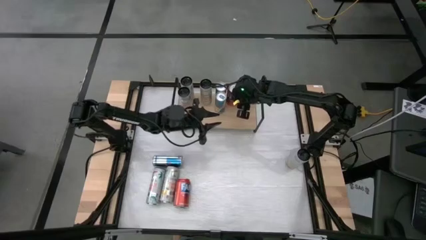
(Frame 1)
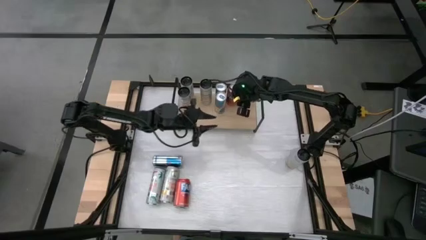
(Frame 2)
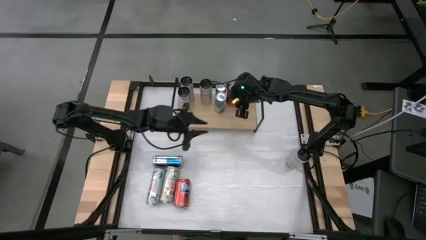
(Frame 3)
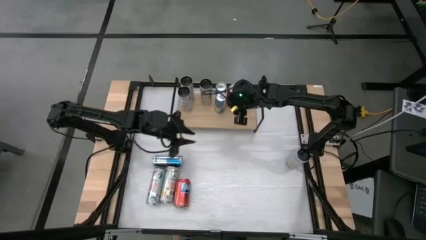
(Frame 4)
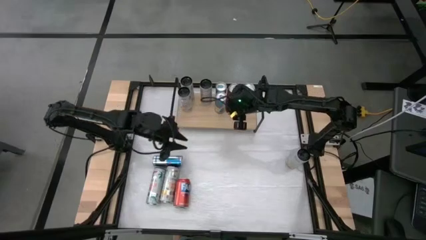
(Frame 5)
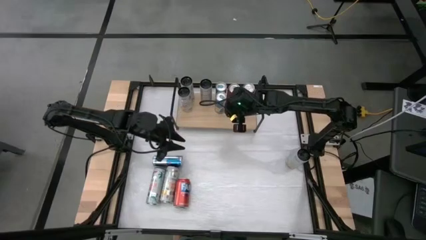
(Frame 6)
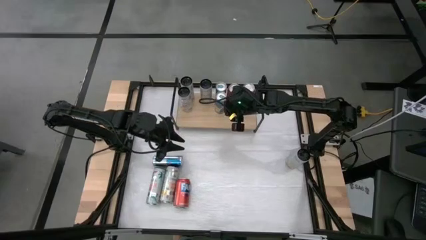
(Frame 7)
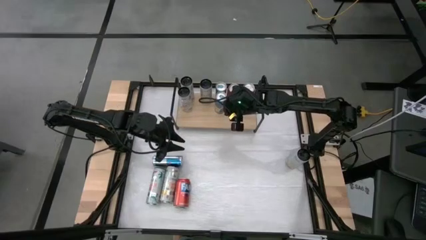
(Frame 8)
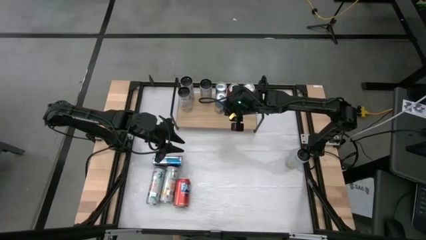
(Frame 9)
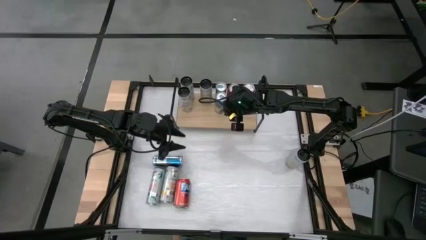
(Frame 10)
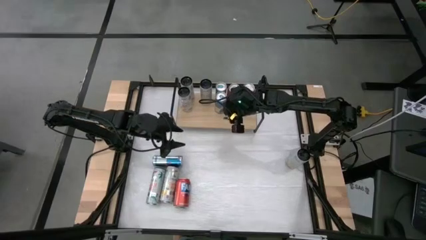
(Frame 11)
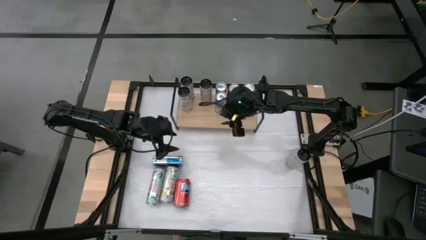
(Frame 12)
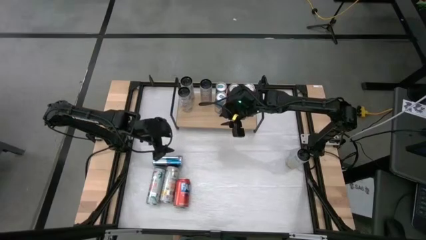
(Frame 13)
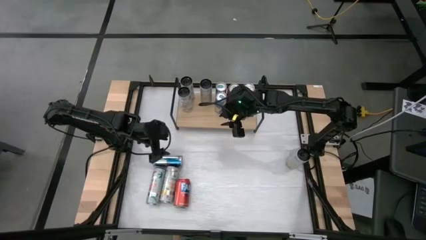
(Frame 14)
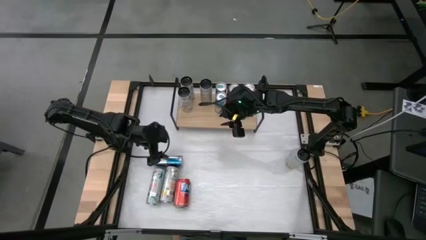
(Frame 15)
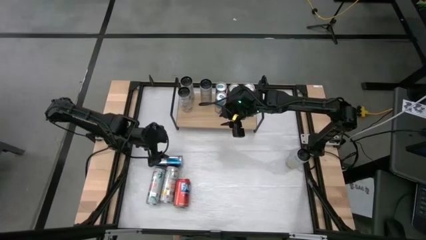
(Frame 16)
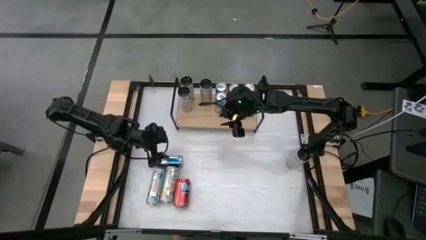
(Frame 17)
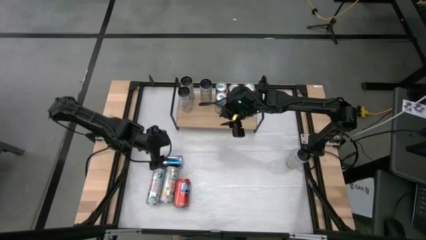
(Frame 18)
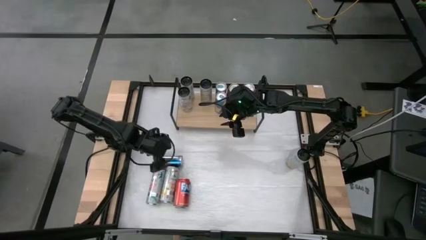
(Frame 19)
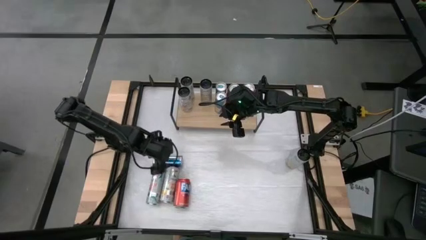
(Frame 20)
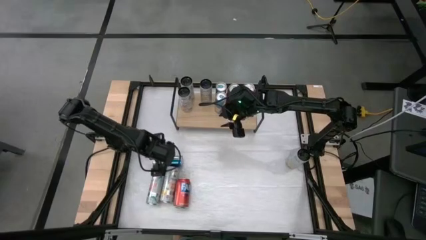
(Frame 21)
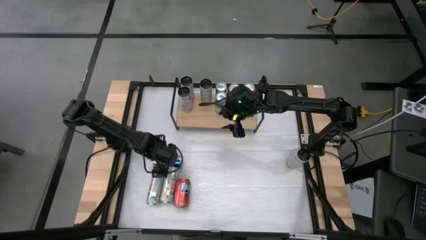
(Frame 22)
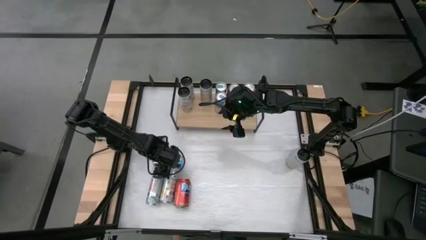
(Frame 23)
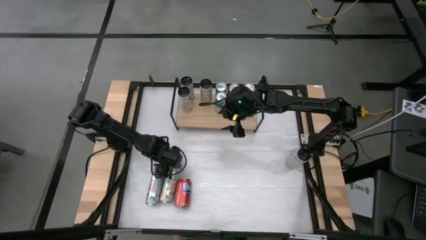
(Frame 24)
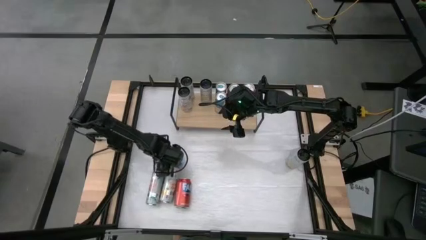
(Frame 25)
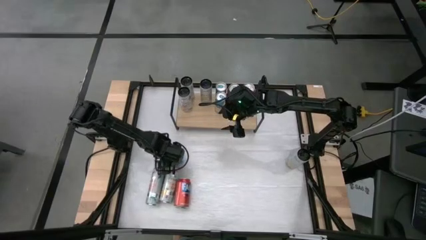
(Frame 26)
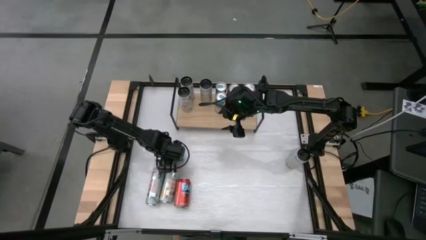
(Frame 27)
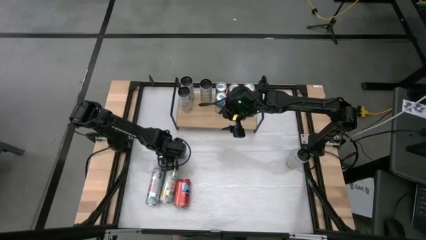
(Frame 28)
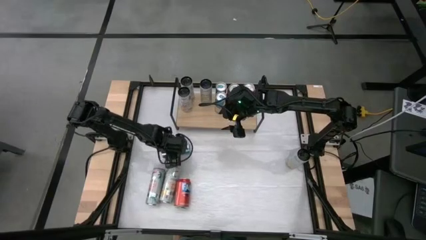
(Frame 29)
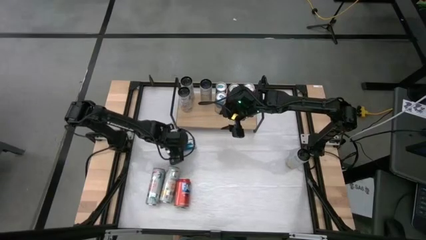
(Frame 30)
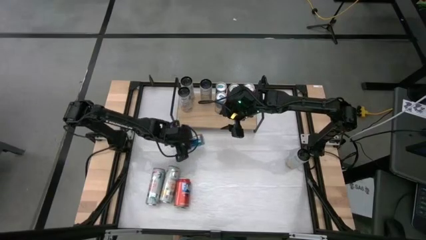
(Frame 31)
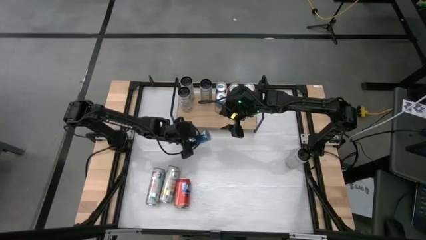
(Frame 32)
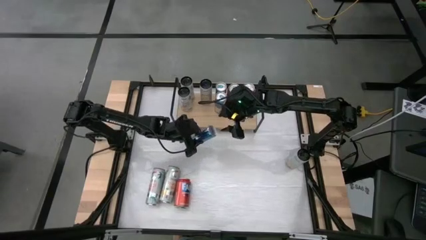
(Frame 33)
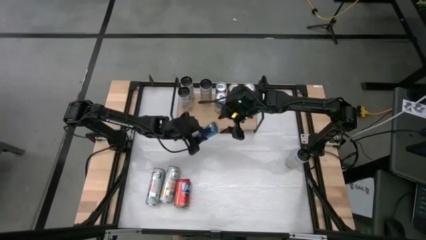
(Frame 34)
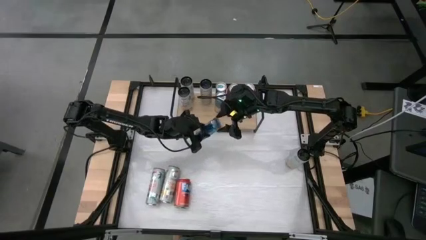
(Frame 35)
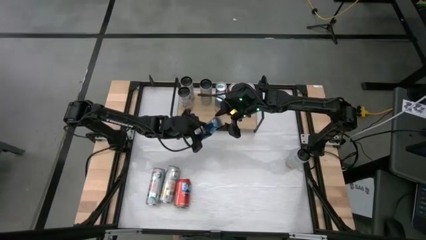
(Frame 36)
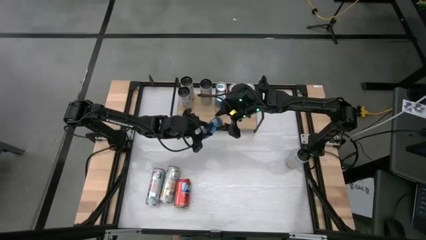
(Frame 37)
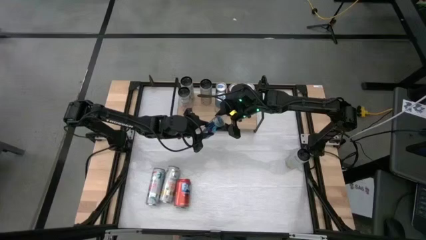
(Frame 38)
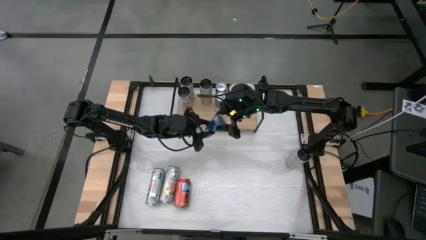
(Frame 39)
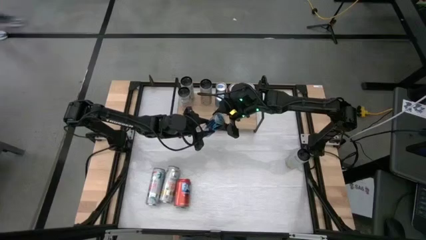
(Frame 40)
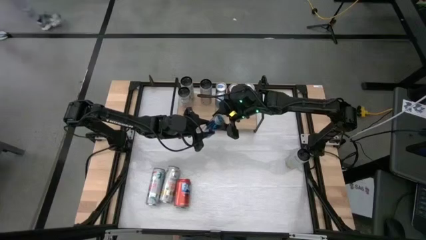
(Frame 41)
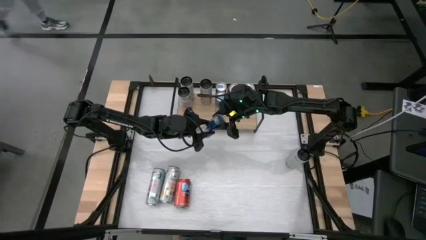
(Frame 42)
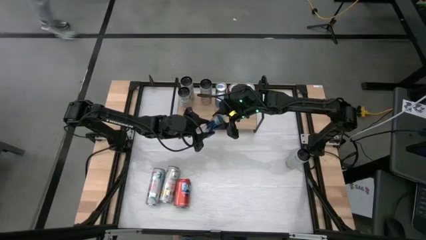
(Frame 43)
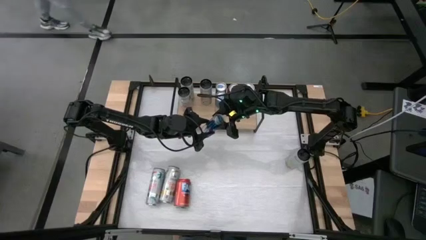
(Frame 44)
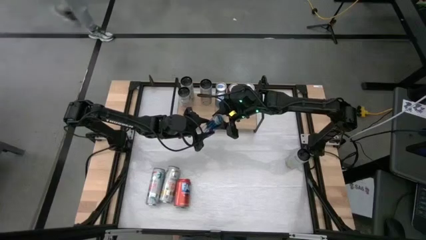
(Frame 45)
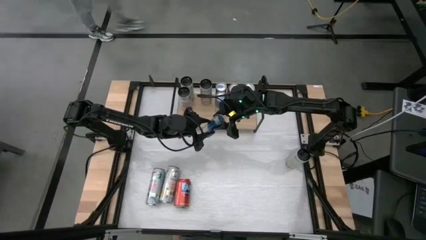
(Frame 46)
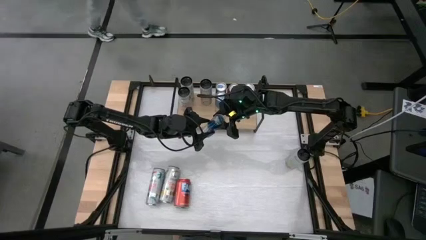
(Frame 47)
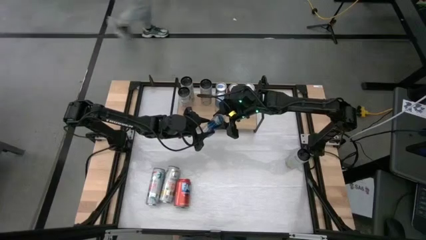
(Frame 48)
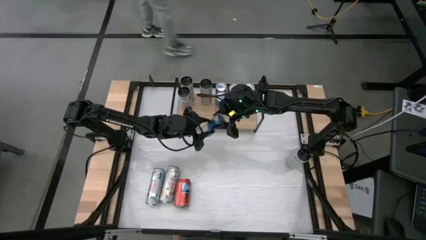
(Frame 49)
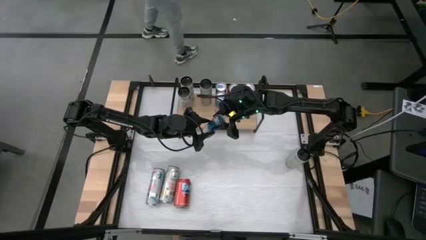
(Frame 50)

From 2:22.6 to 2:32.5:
Task: Place canned beverage on shelf
Put the blue soda can on the shelf aligned with the other blue soda cans

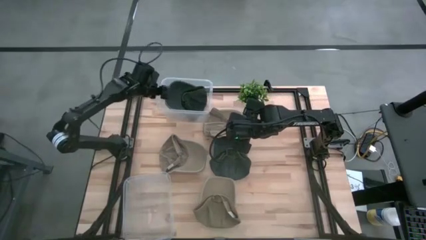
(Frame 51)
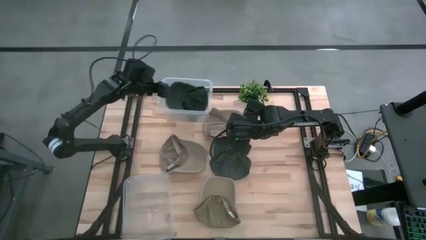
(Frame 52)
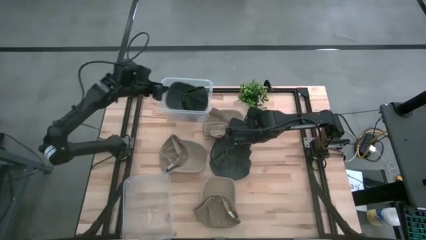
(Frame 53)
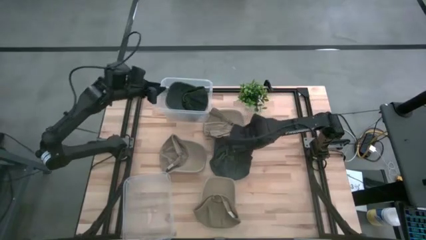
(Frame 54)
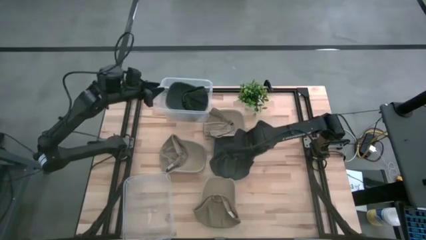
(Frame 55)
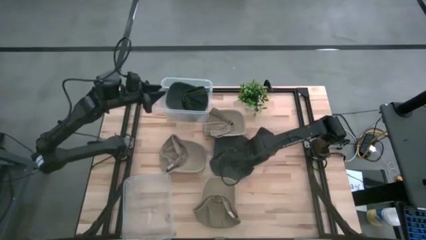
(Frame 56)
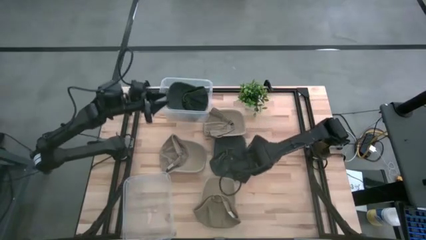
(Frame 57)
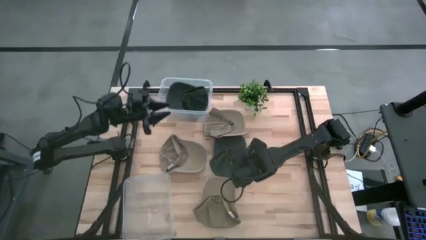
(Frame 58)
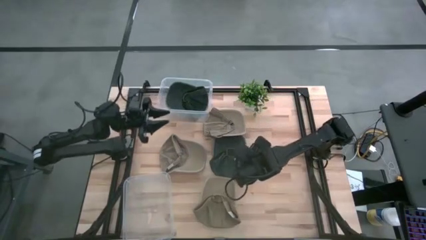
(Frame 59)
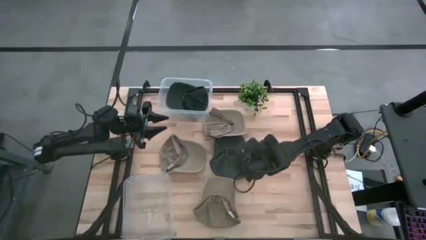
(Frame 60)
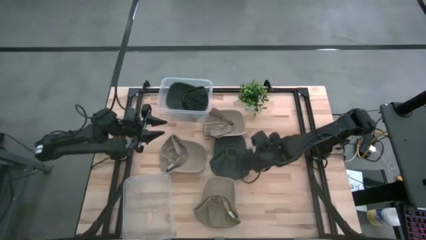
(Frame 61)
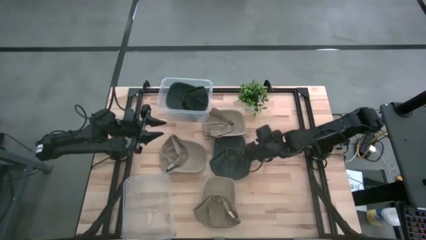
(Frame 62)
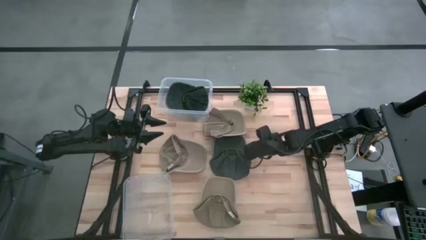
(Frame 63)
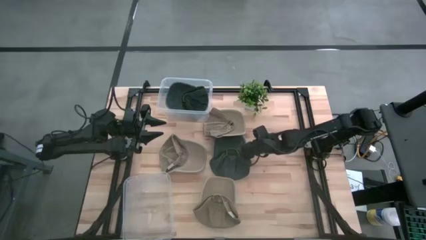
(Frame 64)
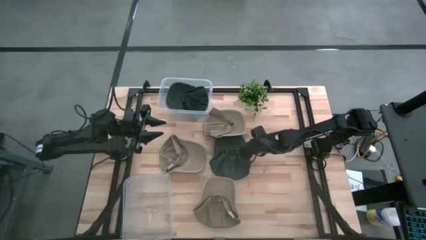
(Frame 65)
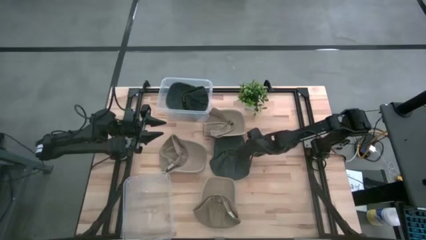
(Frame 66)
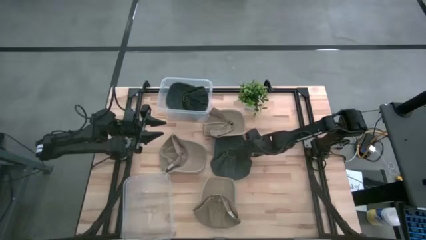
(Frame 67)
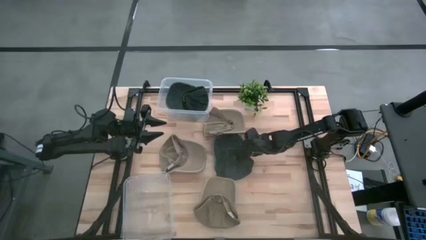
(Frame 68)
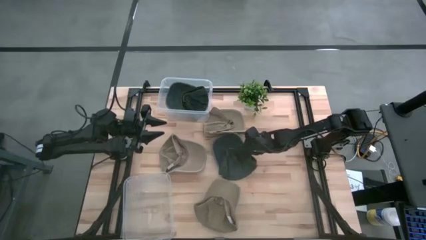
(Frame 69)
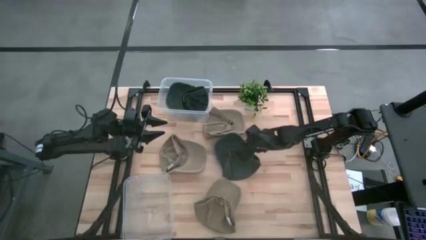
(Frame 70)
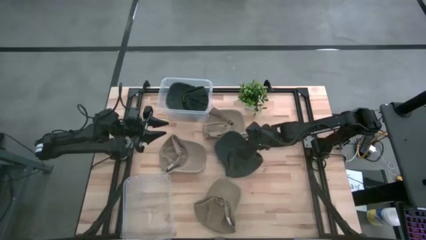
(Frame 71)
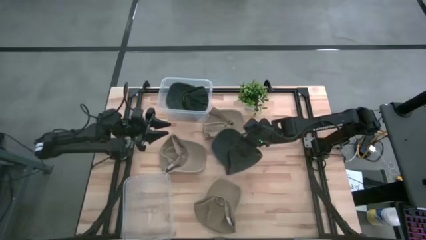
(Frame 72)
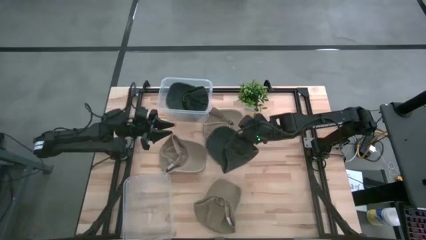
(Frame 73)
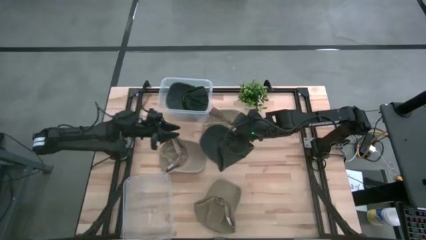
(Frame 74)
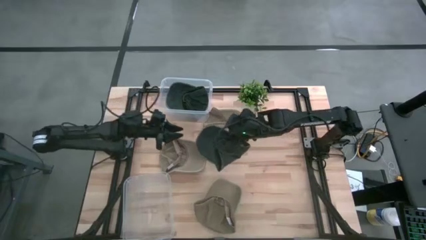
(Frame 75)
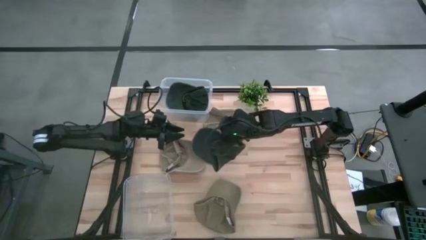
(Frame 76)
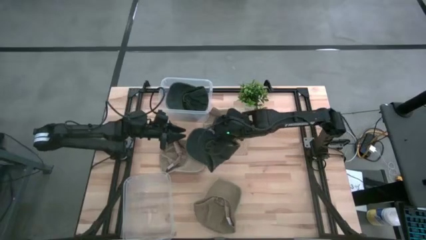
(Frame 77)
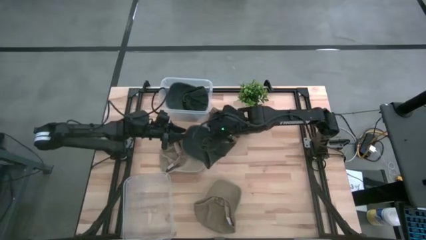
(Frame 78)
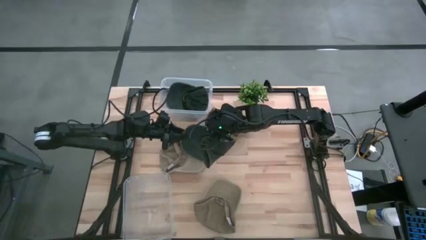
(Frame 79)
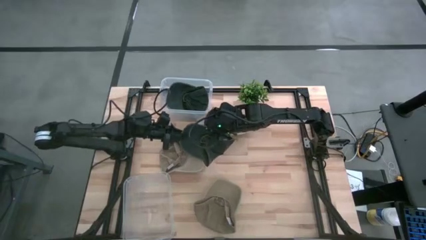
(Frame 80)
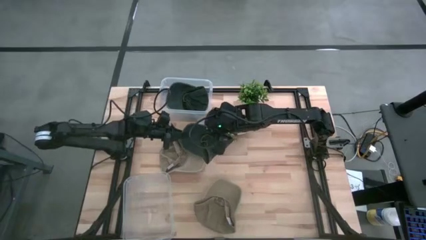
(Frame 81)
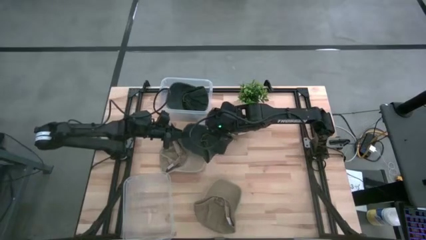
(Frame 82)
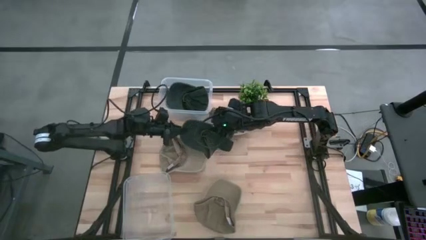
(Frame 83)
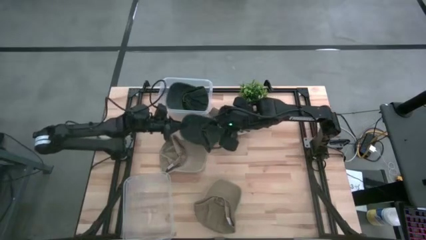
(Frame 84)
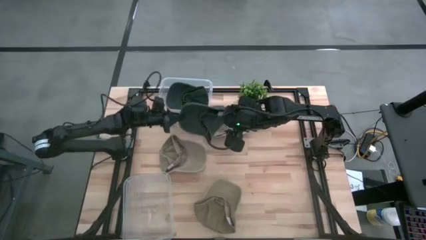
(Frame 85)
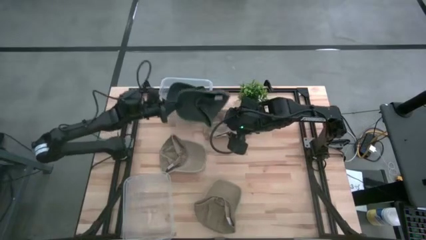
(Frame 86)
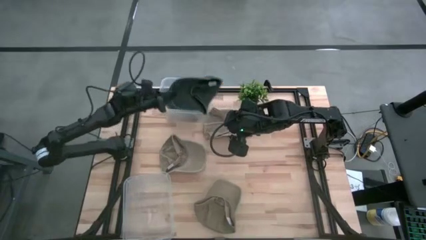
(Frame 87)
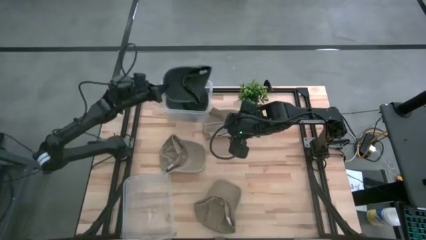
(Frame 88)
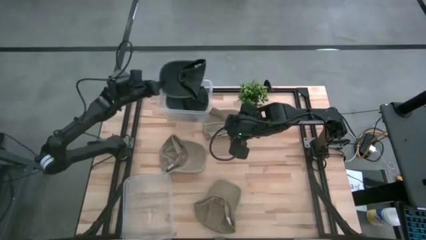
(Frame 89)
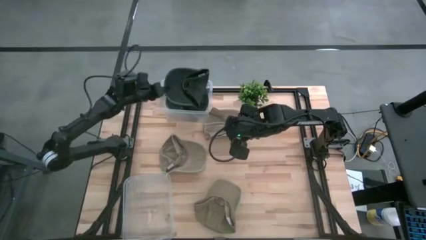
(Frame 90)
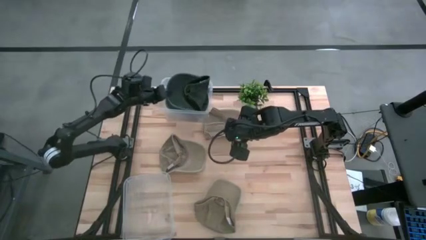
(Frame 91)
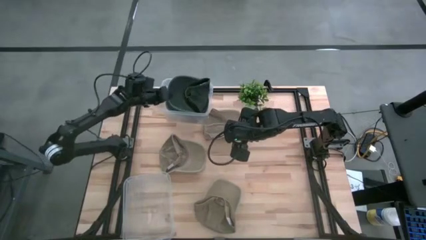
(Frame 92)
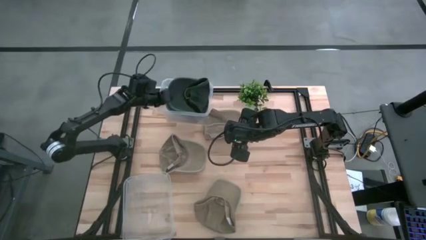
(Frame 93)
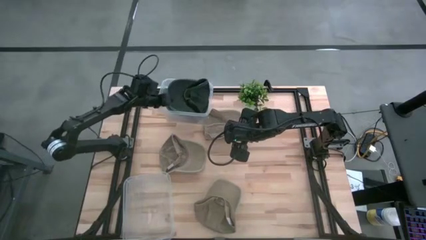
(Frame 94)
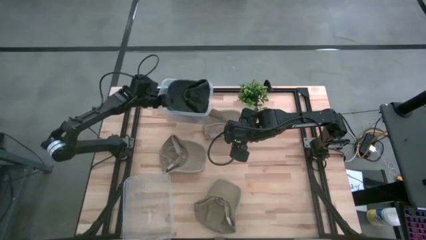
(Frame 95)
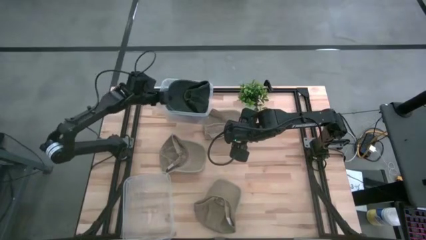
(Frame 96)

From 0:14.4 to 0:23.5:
Task: Pick & Place hat
Put the black cap in the top transparent bin
